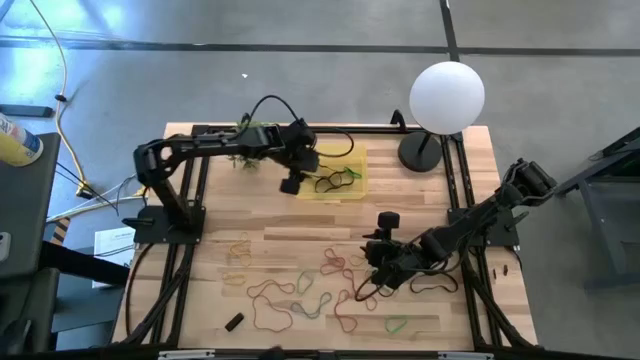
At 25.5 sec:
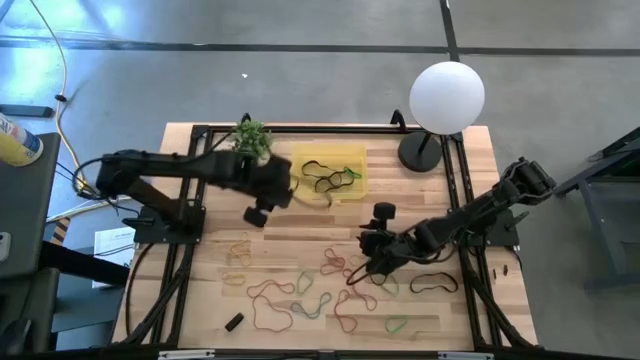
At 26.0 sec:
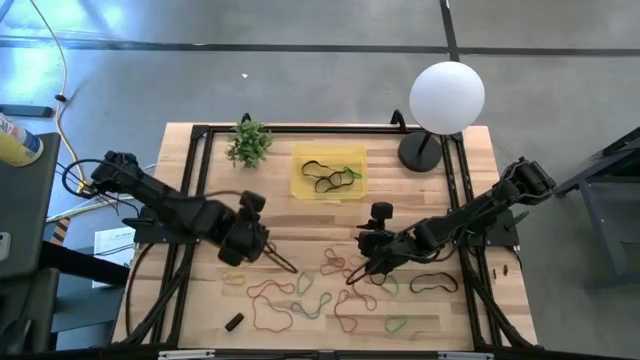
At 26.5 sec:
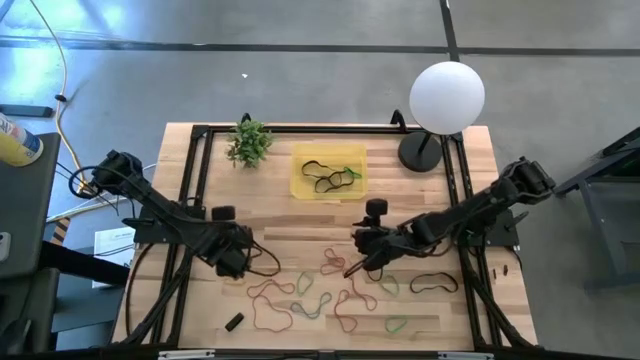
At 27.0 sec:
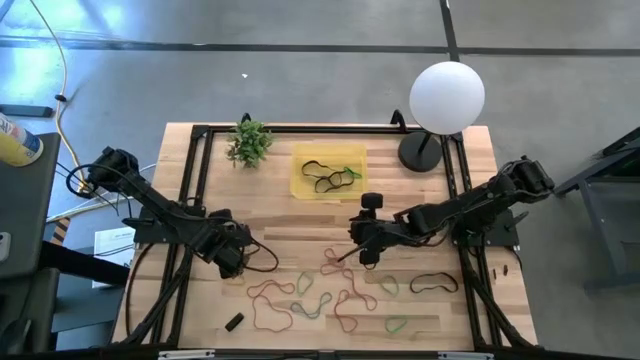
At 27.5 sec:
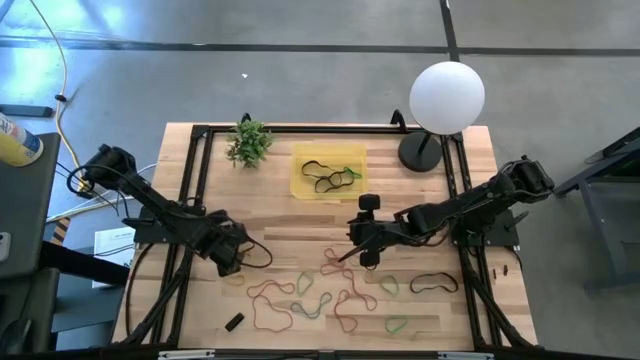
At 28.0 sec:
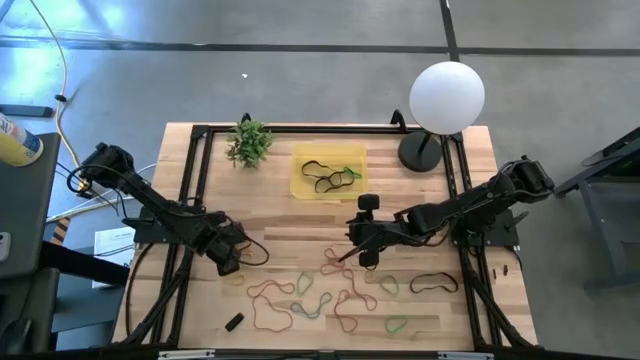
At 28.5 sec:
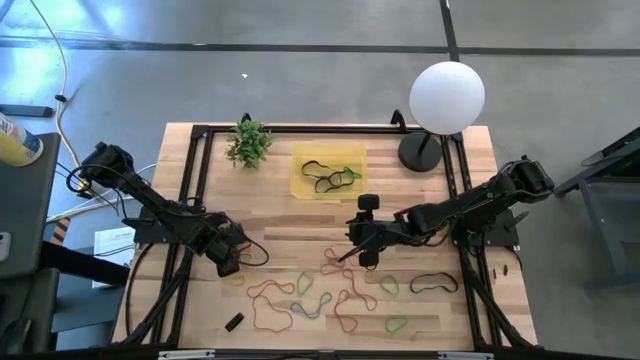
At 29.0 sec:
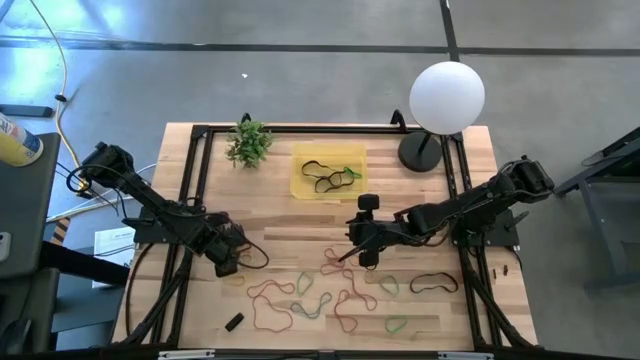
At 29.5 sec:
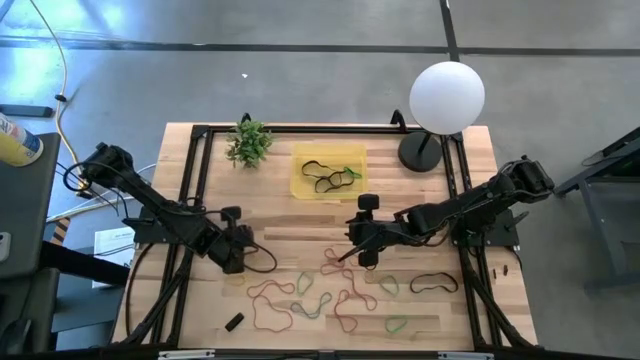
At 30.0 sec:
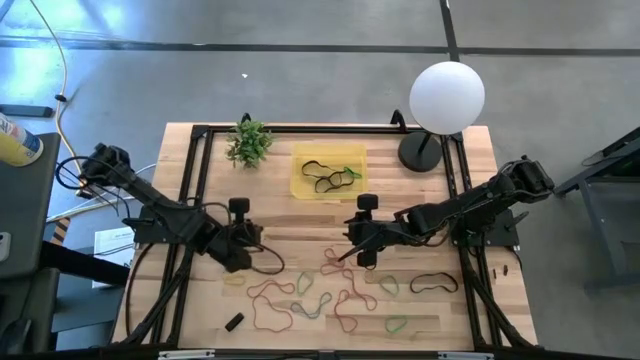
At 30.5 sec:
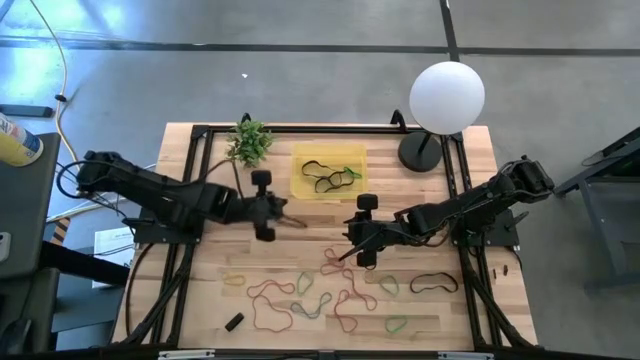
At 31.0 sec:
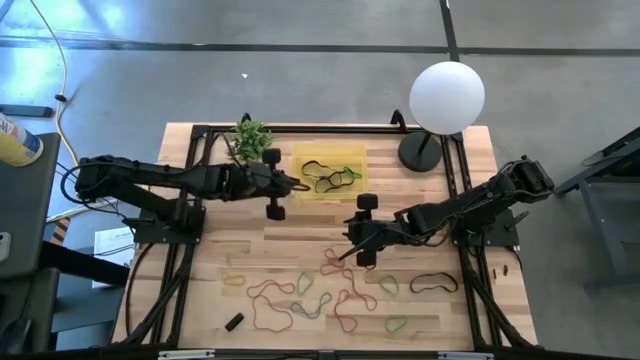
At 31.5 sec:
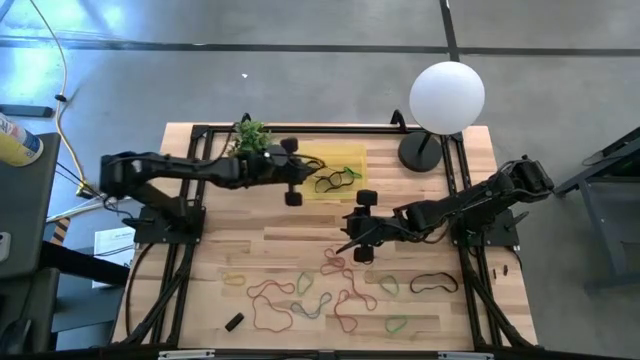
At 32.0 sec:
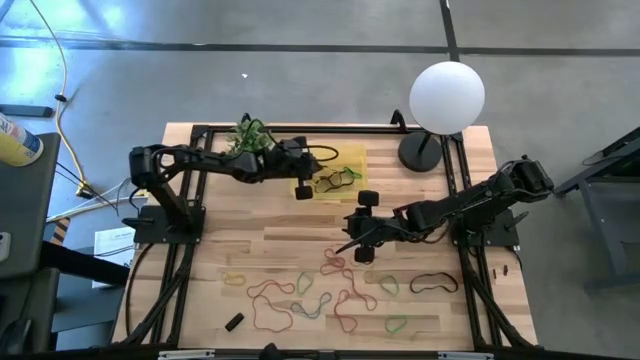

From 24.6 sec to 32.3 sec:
Task: Pick and place rubber bands into bin
Put the top yellow rubber band into the yellow bin

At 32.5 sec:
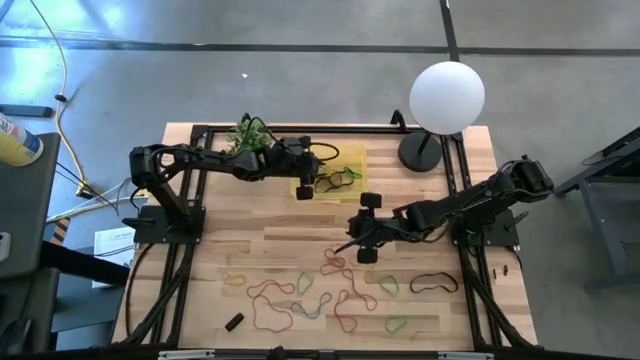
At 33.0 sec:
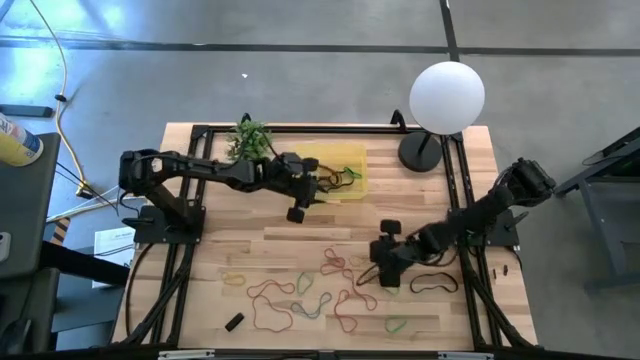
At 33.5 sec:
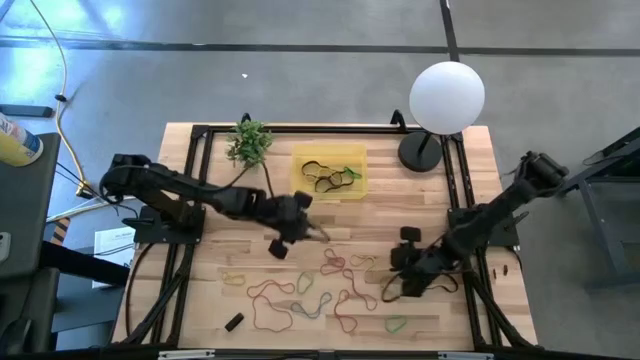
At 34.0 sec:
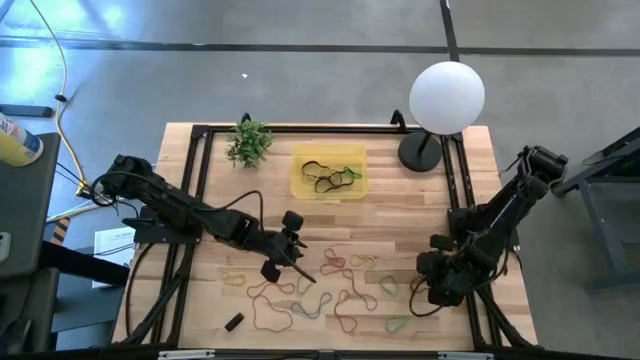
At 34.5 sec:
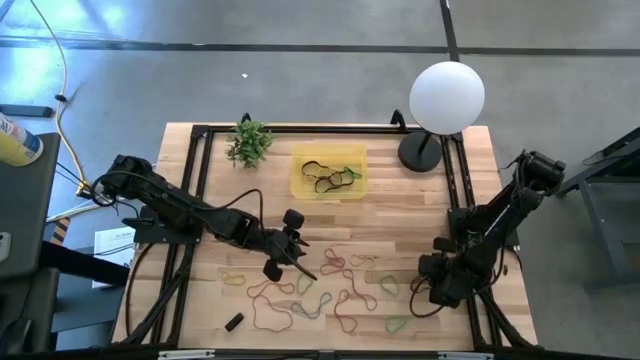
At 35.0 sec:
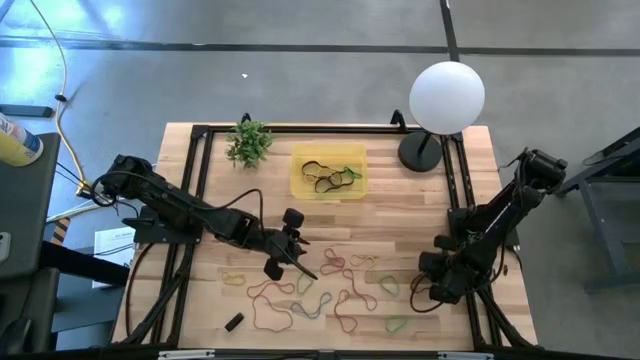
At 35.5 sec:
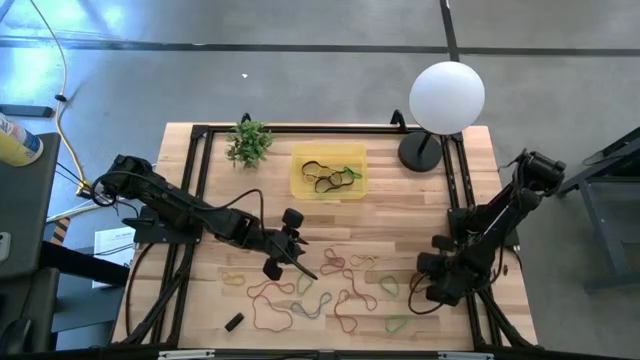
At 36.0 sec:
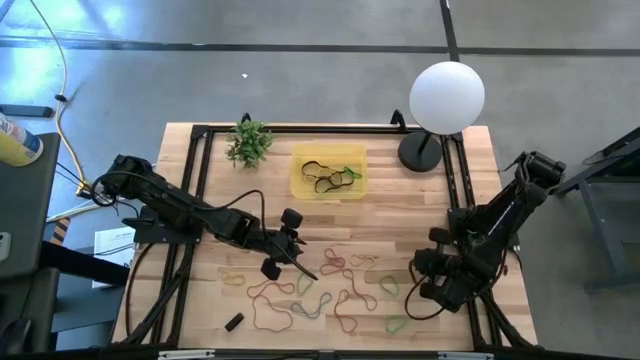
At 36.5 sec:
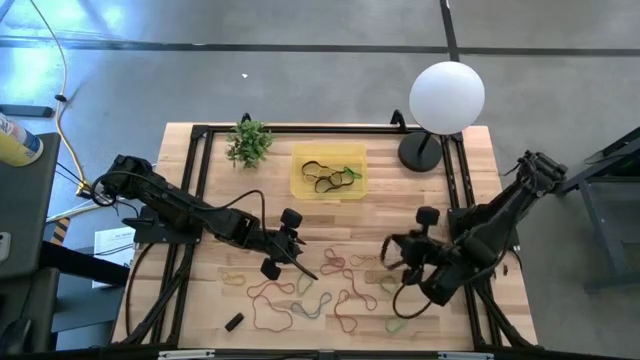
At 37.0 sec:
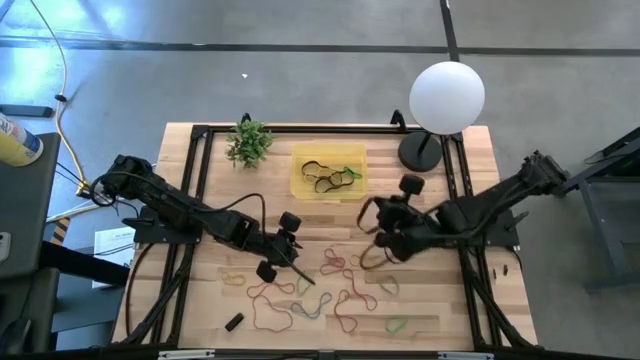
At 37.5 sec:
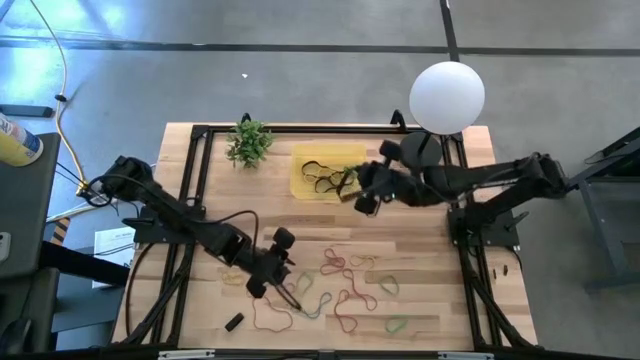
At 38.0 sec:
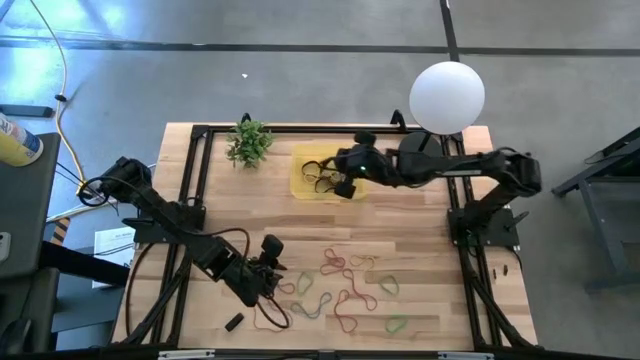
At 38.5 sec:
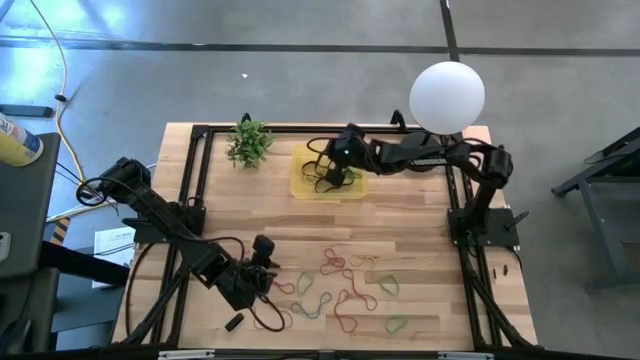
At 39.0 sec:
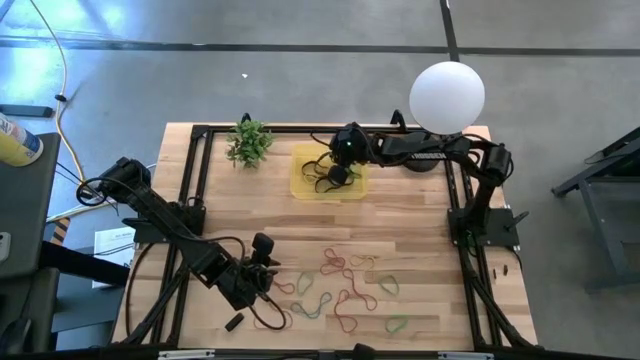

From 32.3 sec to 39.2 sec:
Put the top black rubber band into the yellow bin

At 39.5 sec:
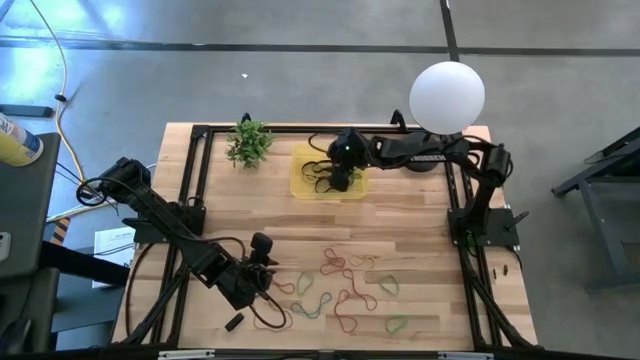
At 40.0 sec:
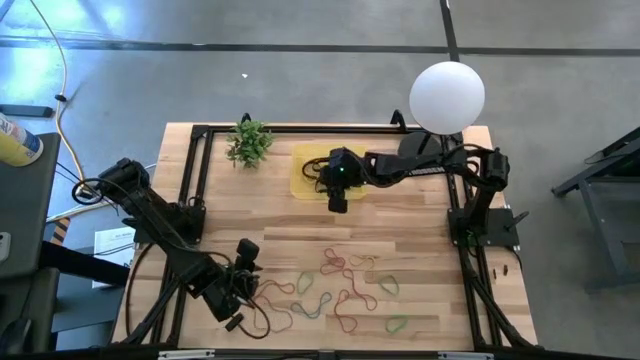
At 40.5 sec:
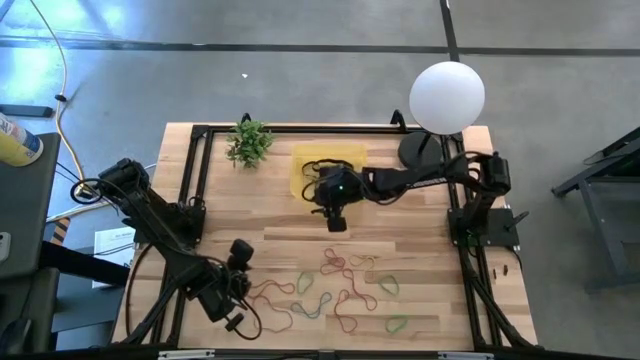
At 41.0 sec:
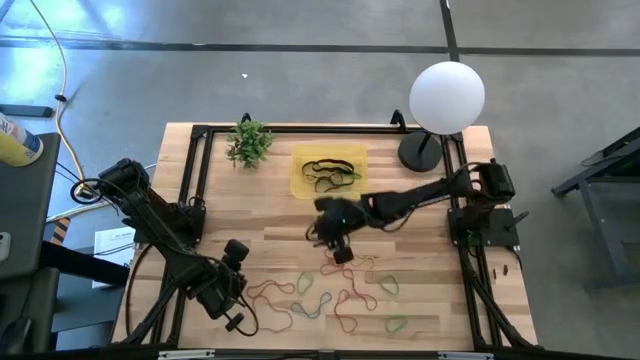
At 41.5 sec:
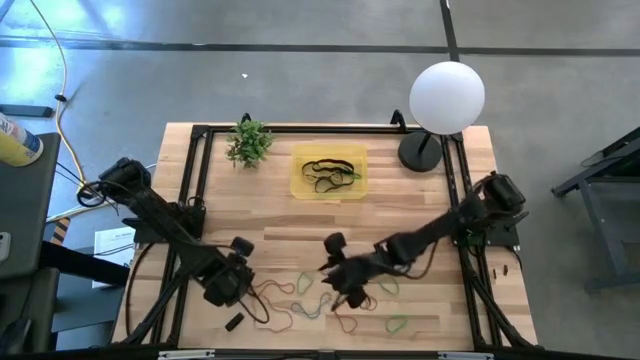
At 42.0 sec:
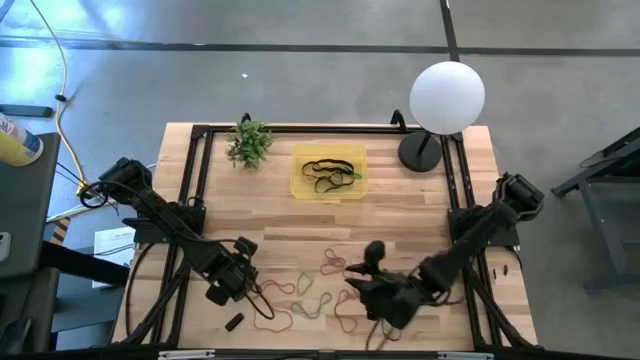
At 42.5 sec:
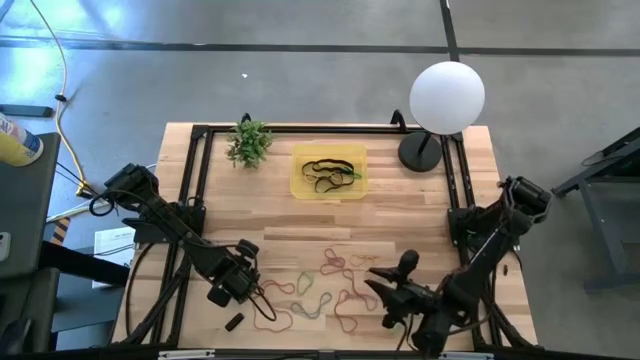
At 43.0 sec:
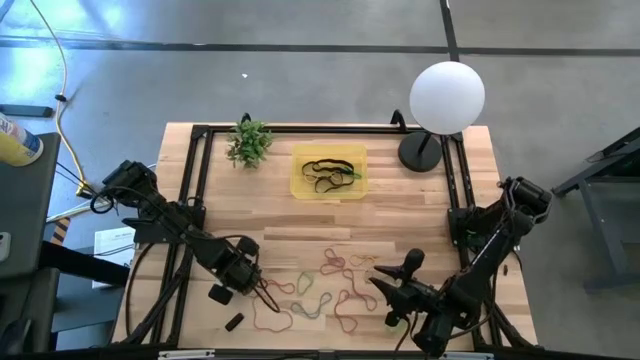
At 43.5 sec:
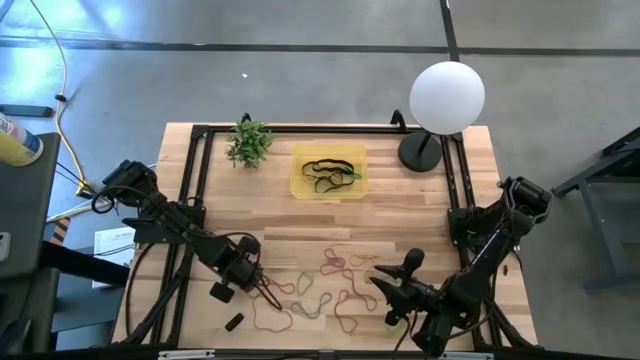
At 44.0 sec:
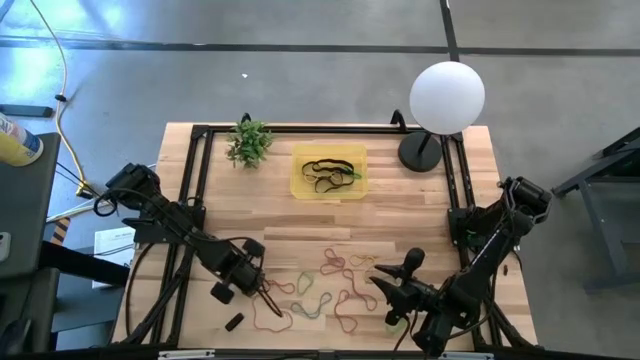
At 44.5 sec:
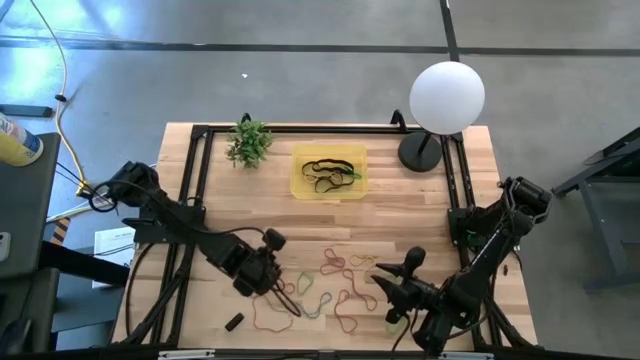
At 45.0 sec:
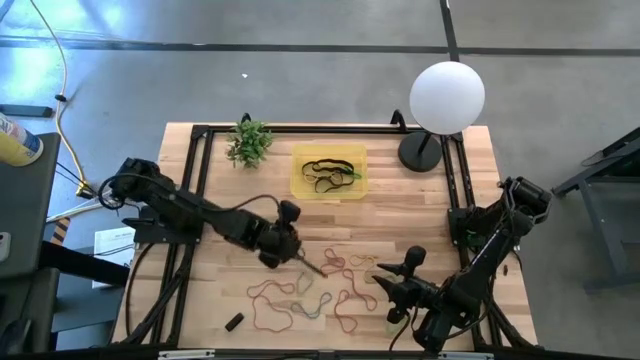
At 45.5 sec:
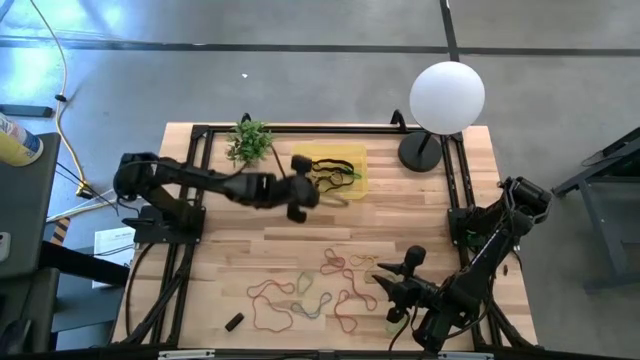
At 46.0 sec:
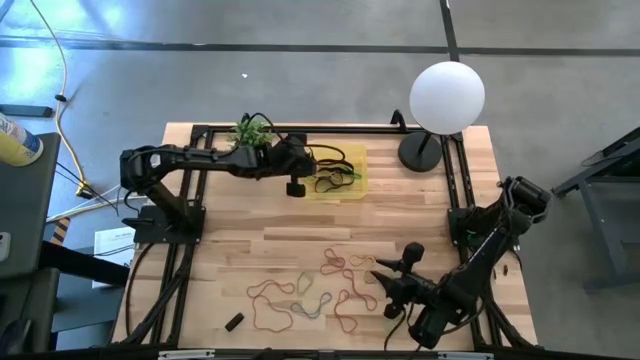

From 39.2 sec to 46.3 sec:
Put the left yellow rubber band into the yellow bin
